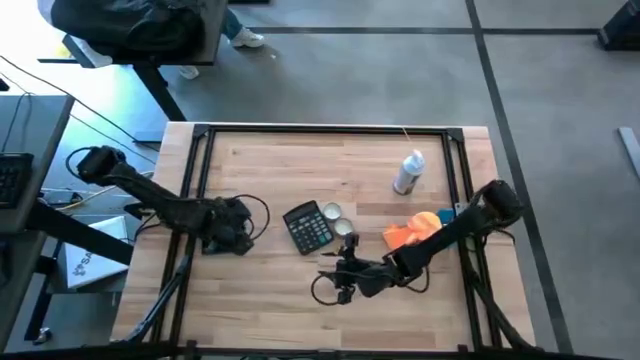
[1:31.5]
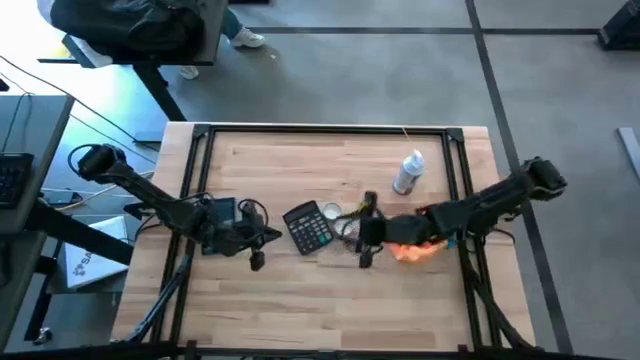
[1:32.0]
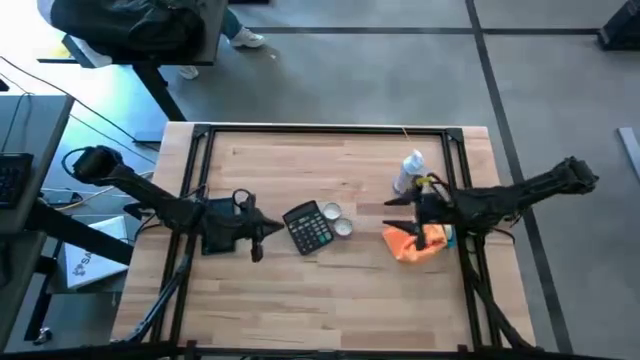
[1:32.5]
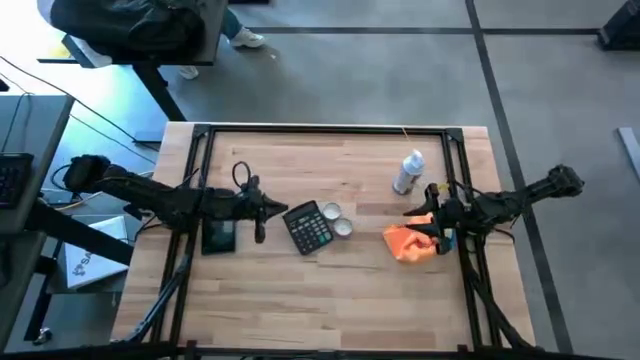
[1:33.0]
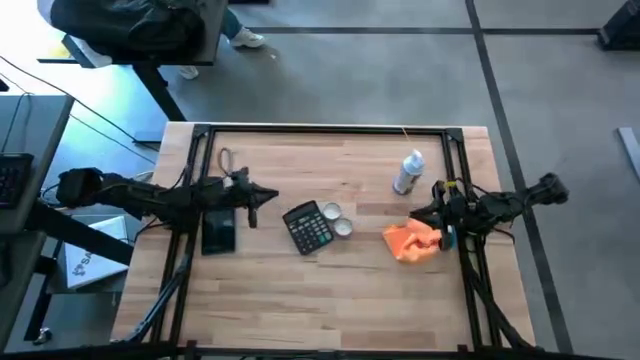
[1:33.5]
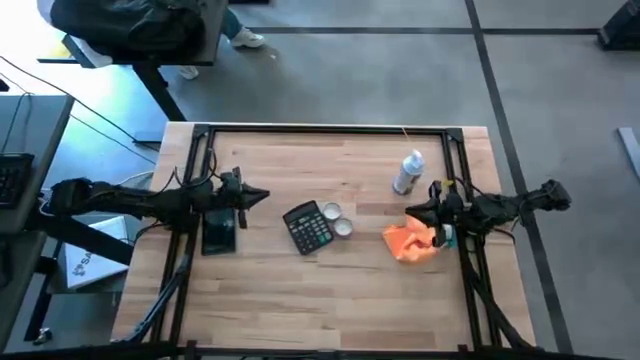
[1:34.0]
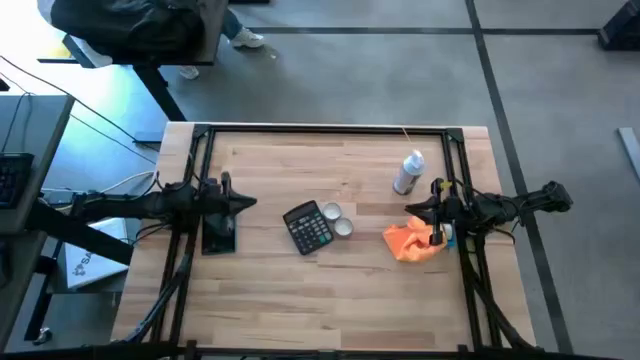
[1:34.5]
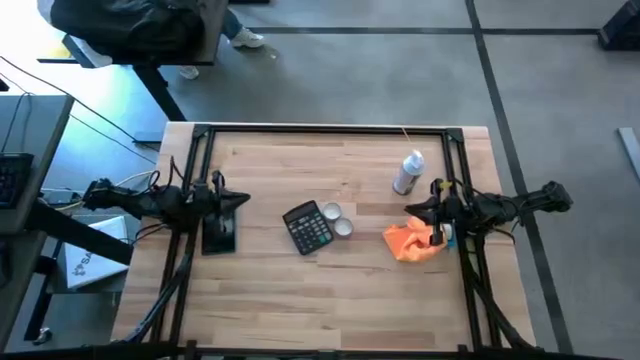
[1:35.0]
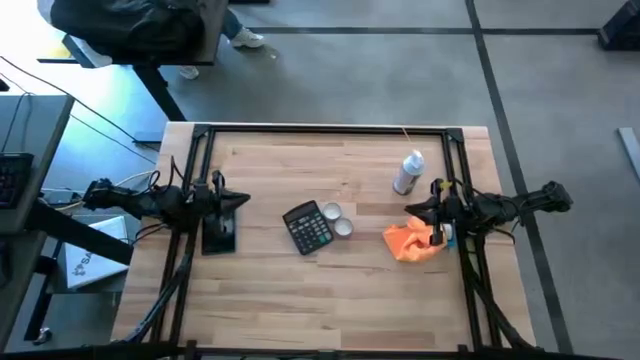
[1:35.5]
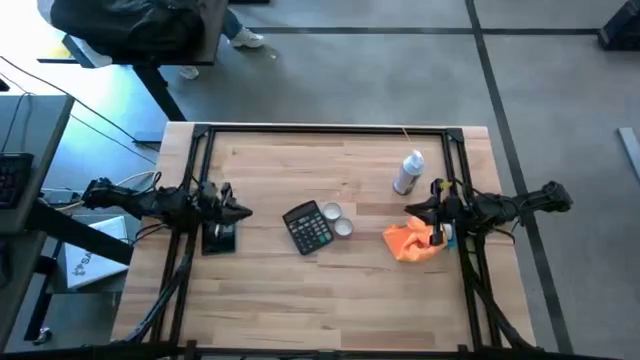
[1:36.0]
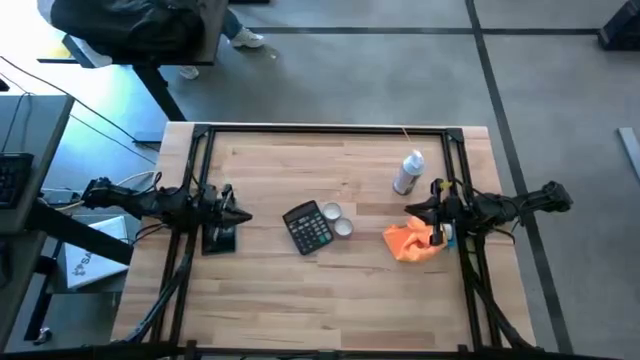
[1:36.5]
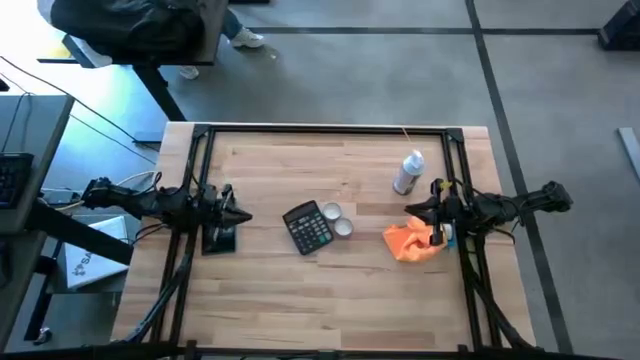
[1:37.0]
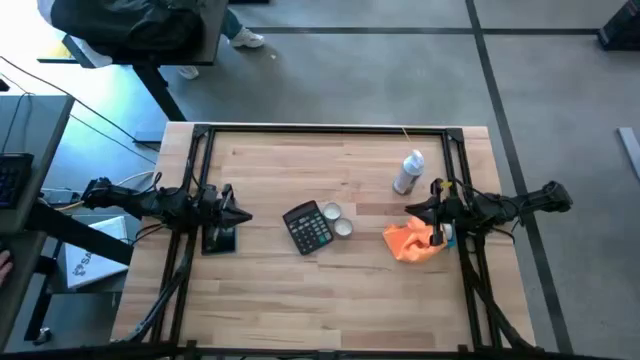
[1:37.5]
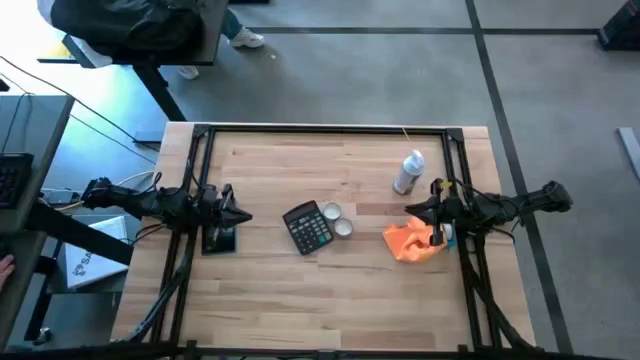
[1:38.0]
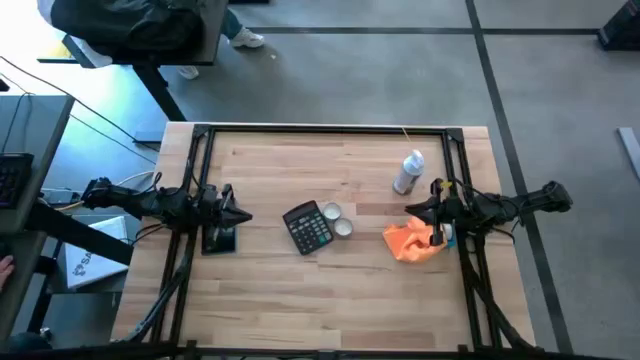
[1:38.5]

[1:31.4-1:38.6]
Task: Apply microfiber cloth
Return to Home Position

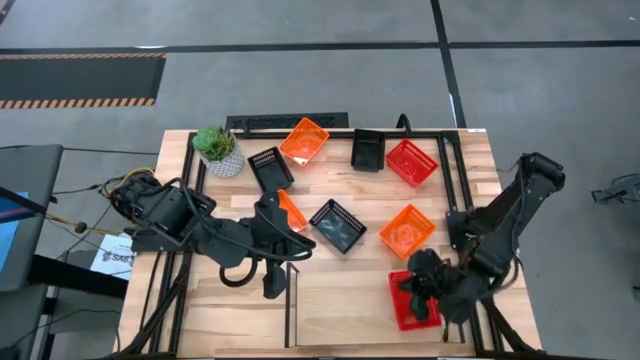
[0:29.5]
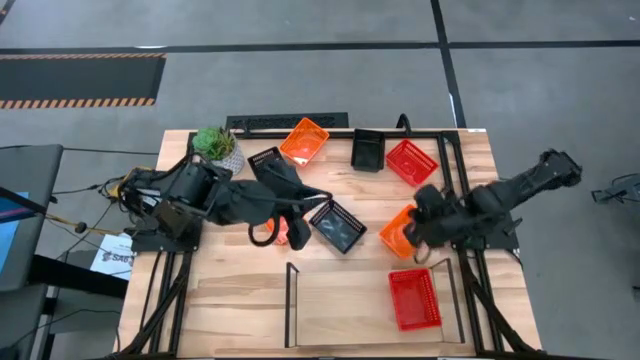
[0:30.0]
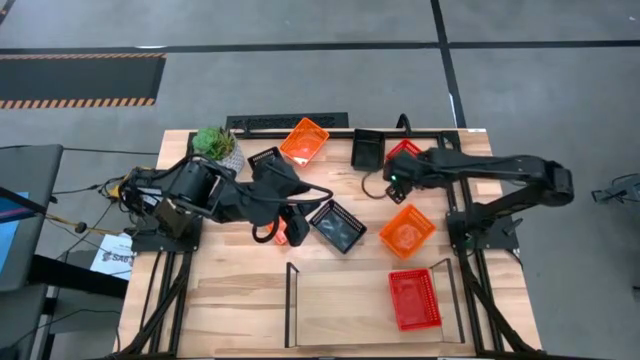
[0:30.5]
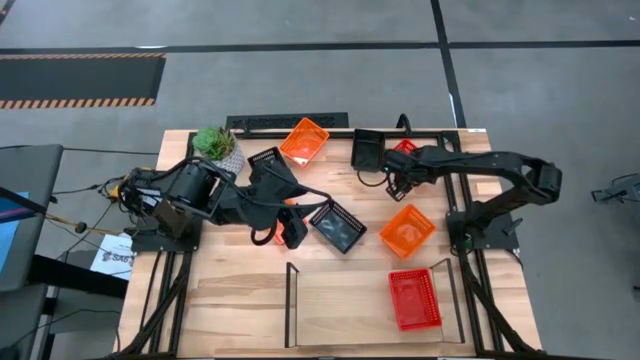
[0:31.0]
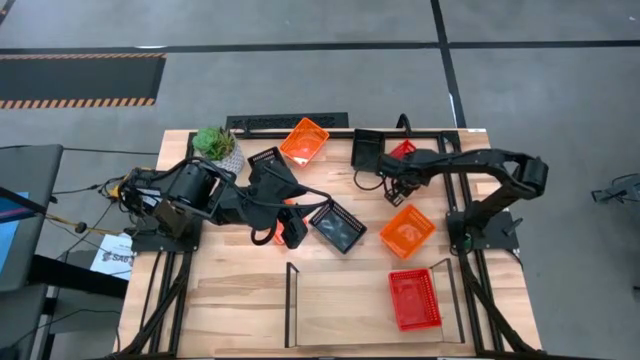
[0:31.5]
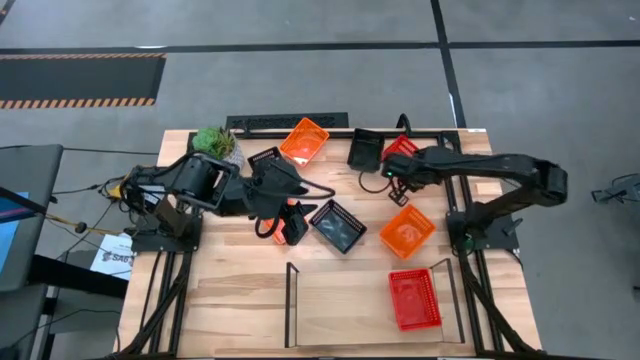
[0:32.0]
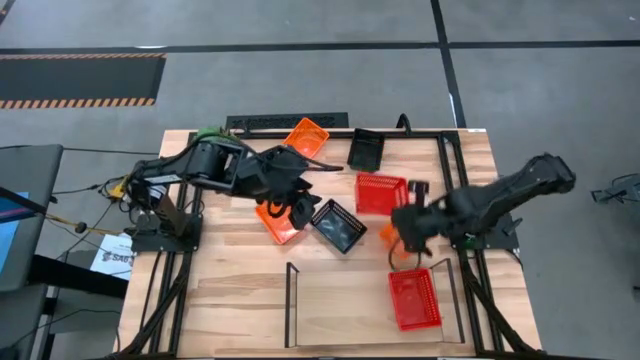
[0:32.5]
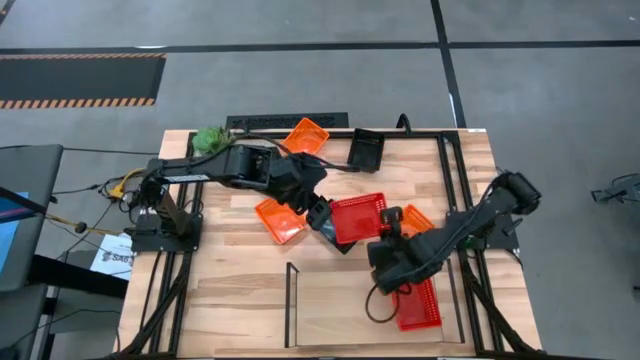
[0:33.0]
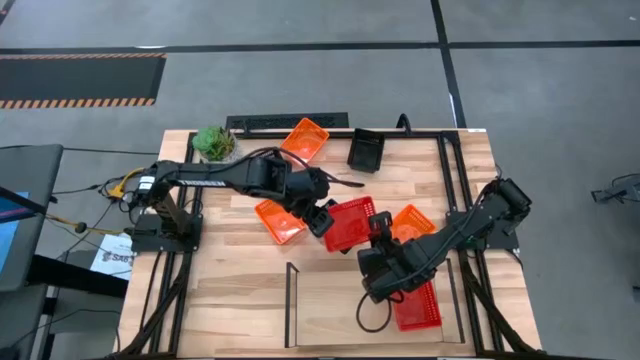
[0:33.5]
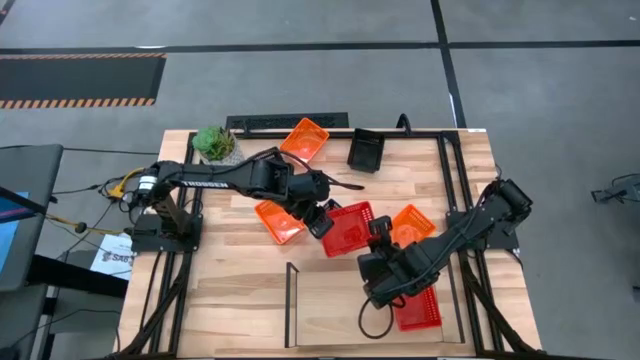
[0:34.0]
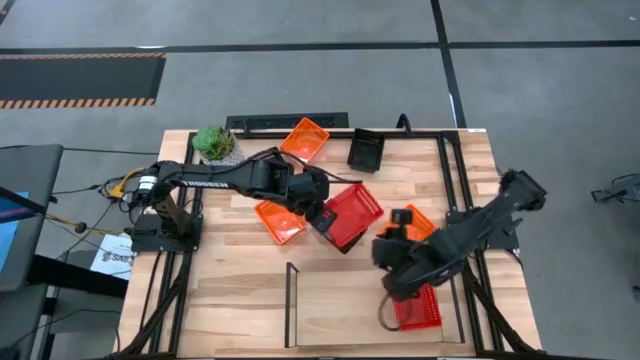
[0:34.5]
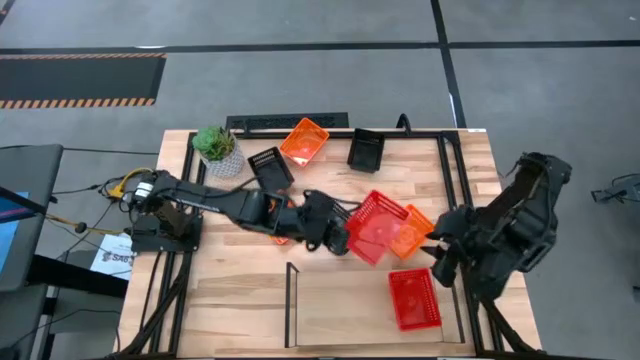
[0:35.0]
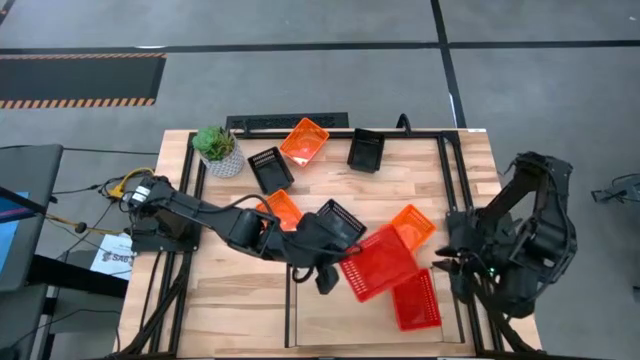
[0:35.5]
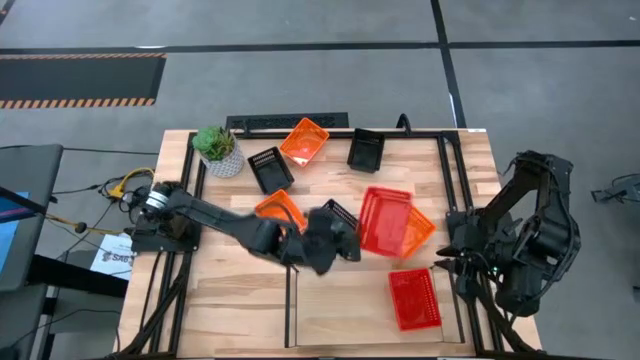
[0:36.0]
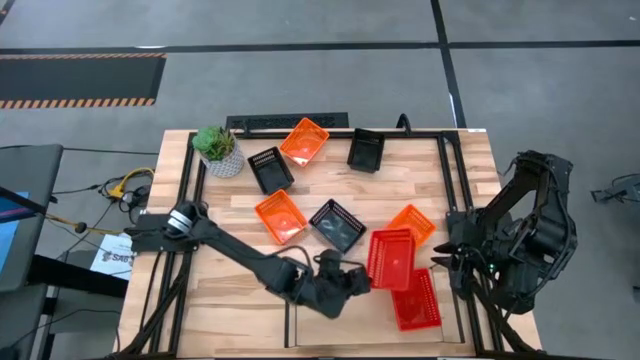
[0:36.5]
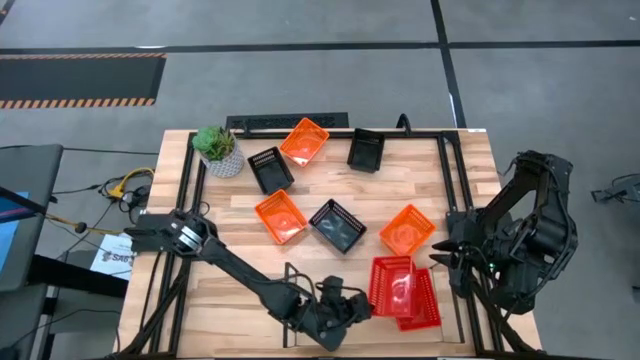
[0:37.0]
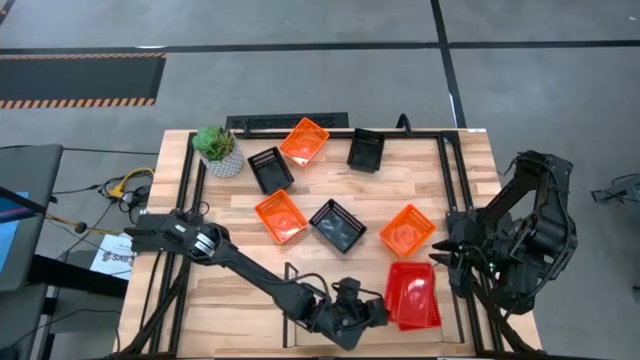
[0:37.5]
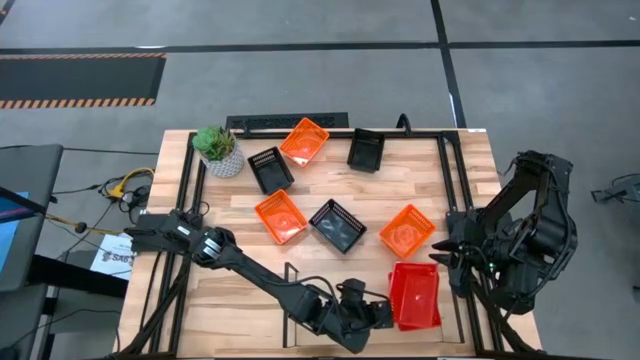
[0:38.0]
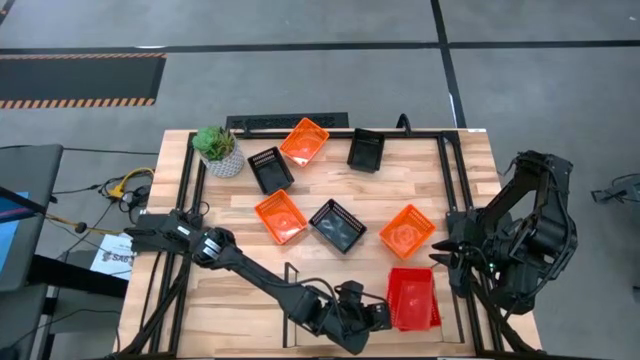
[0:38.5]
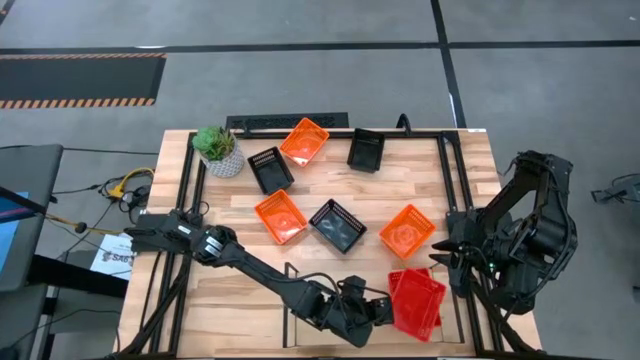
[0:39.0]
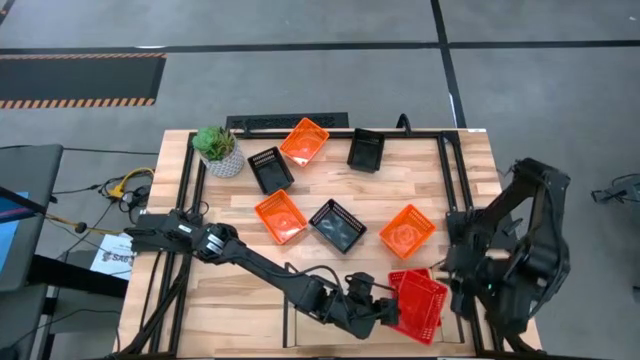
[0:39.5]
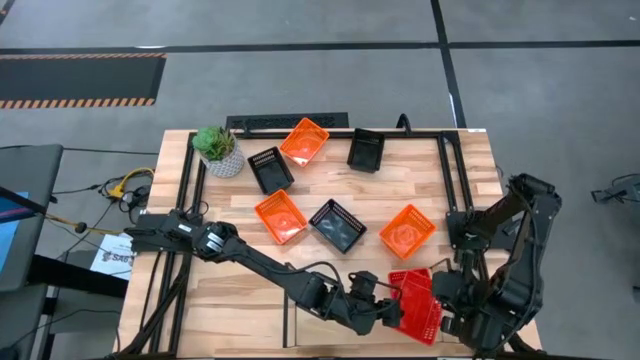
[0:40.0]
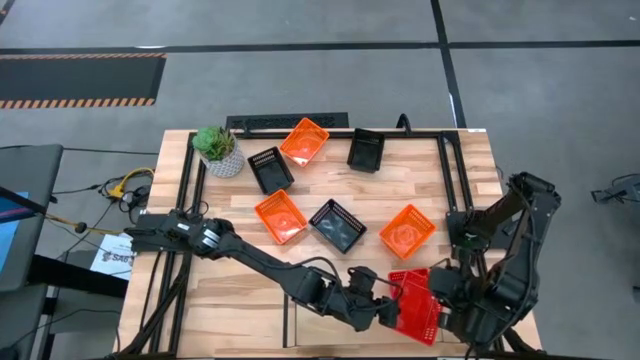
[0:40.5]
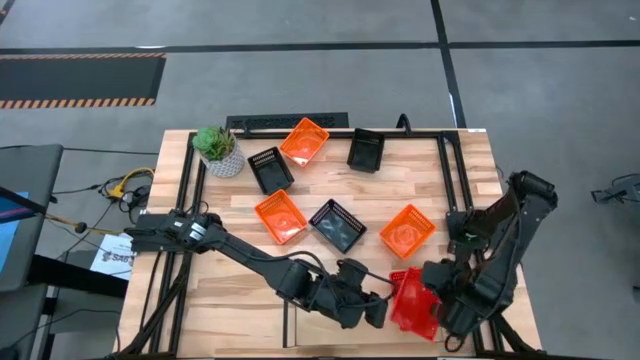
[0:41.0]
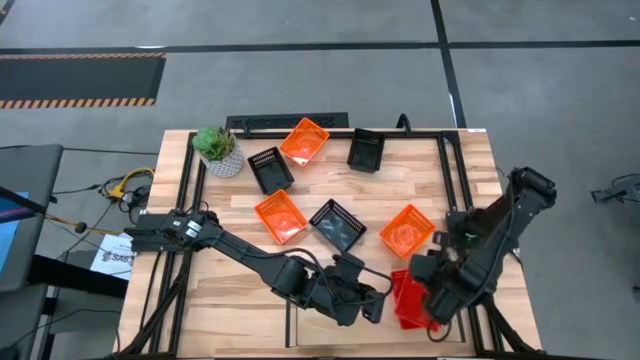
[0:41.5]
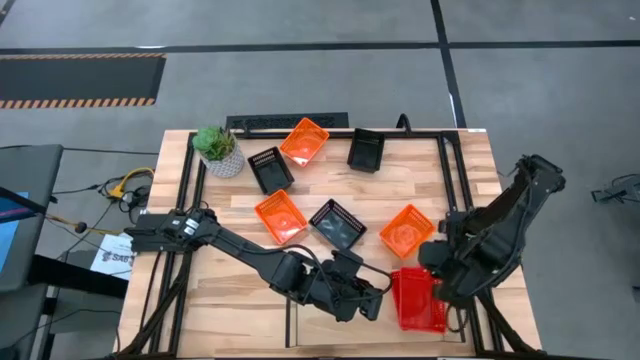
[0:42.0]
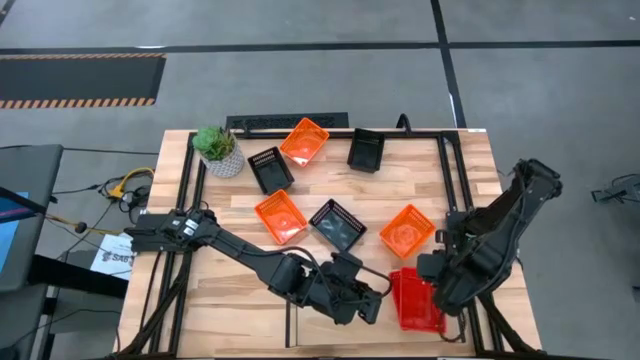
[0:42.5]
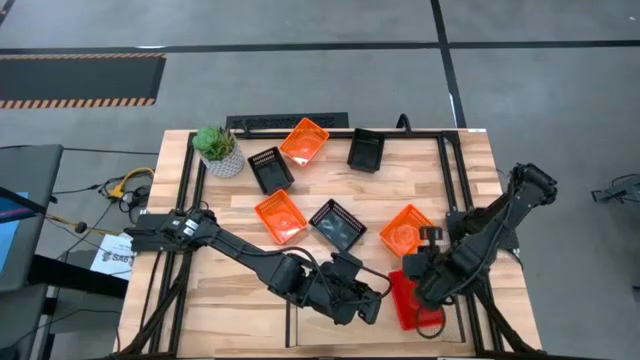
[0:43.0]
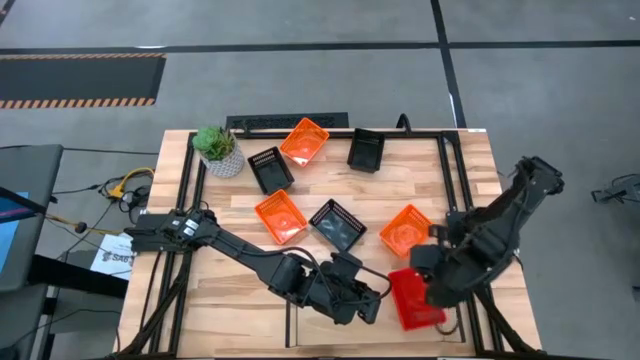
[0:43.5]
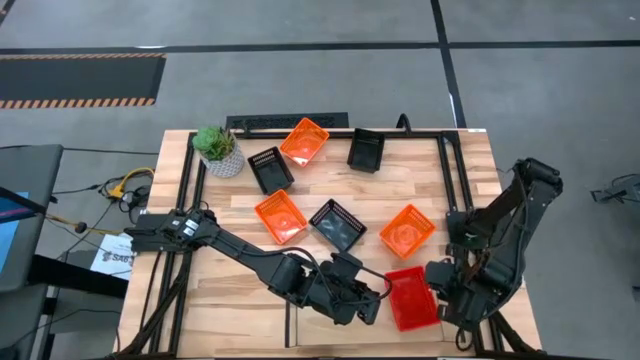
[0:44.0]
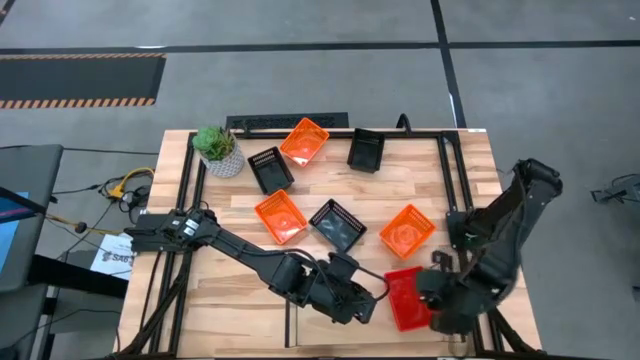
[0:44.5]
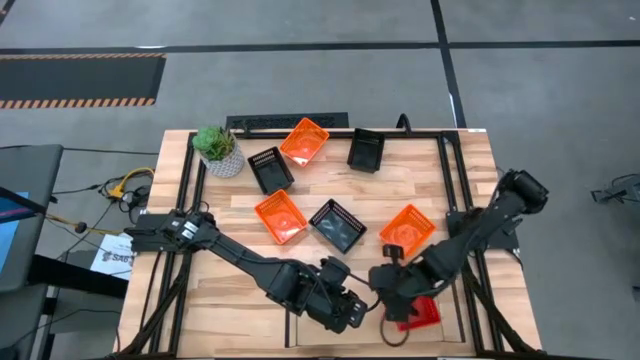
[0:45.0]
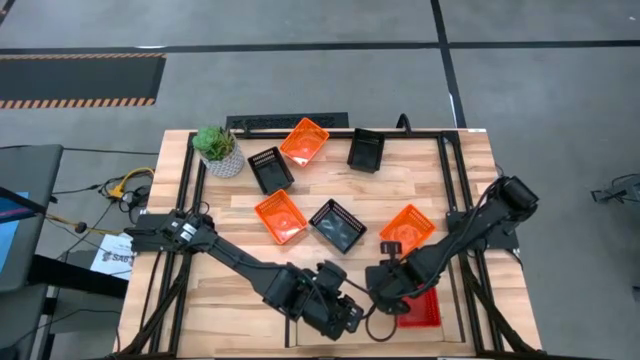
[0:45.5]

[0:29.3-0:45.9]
Task: Stack baskets on shelf by color
Stack the red bin on top of the red bin on the shelf
